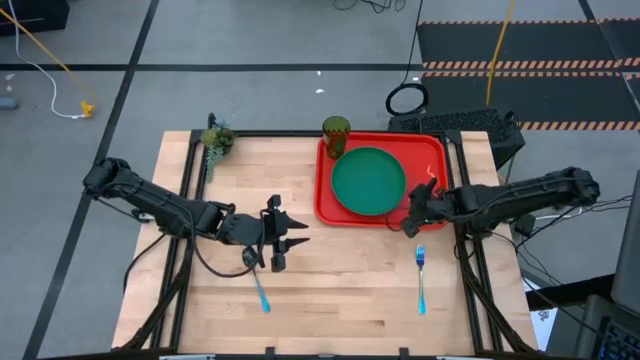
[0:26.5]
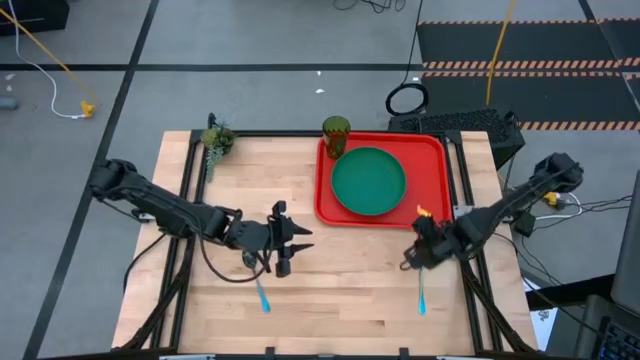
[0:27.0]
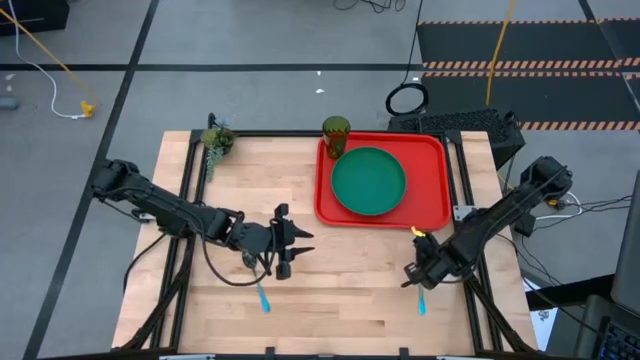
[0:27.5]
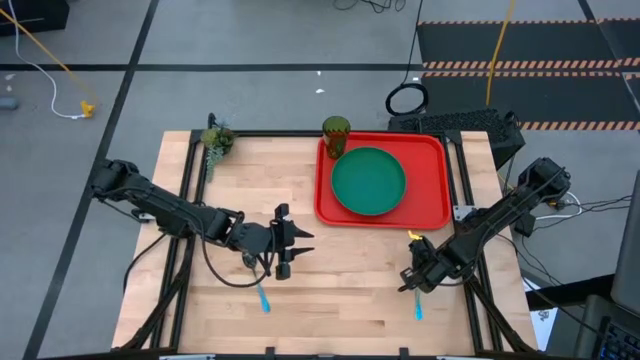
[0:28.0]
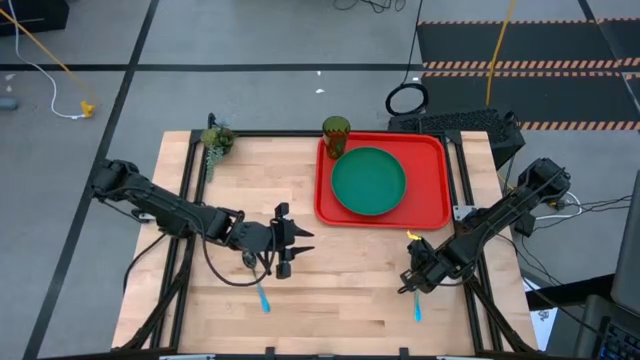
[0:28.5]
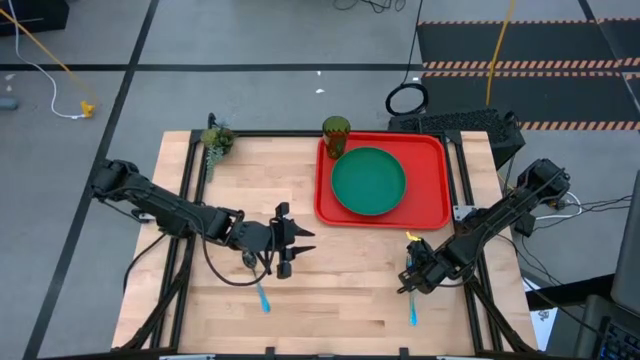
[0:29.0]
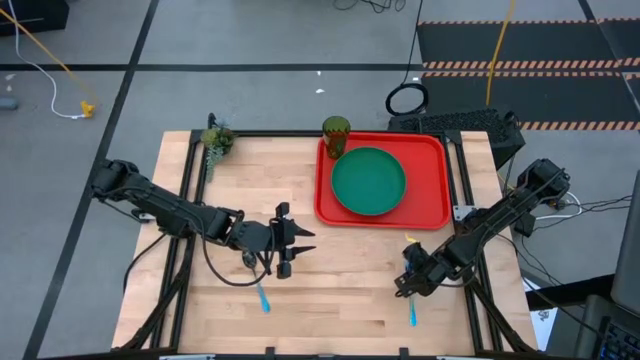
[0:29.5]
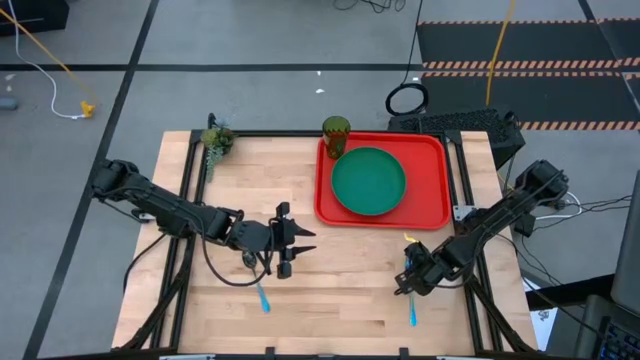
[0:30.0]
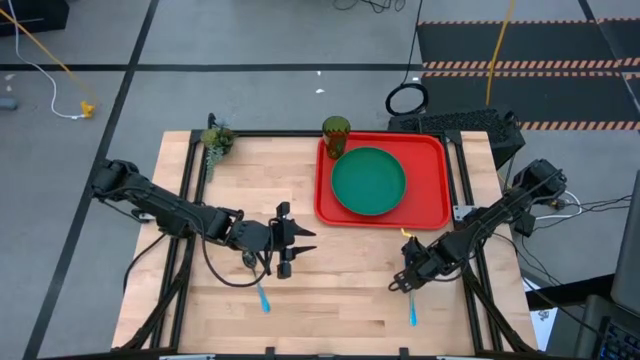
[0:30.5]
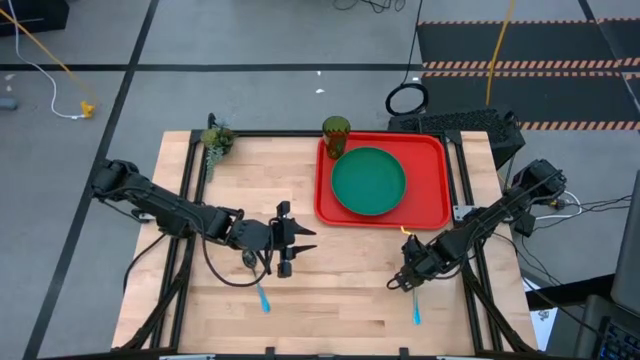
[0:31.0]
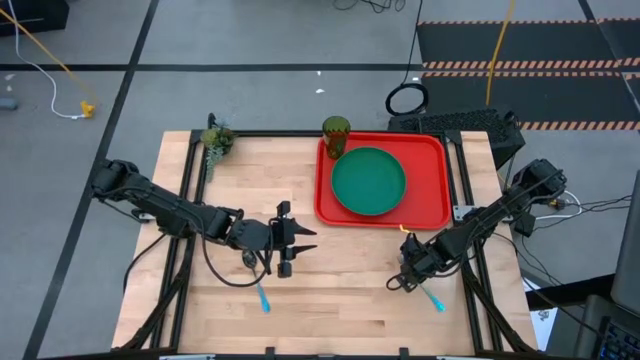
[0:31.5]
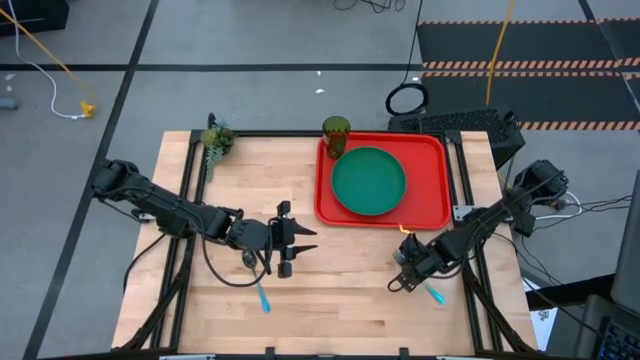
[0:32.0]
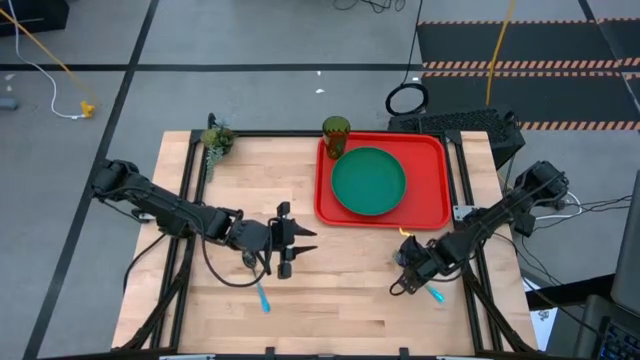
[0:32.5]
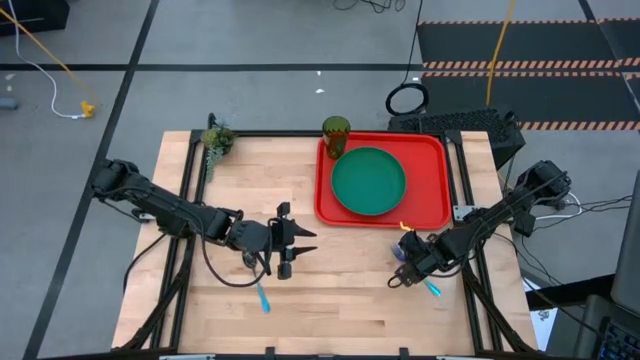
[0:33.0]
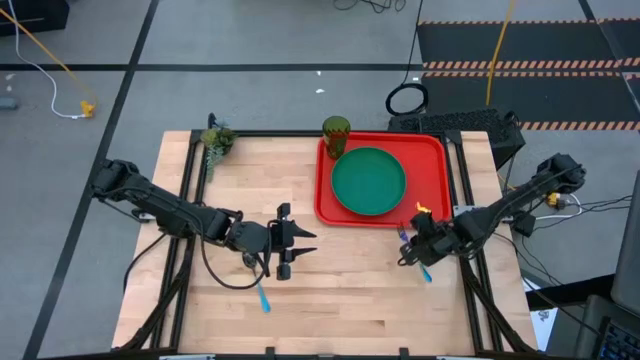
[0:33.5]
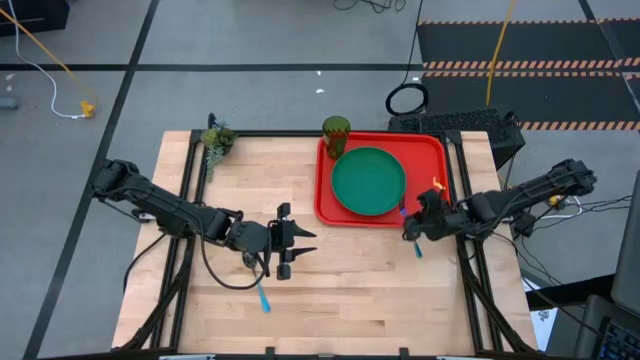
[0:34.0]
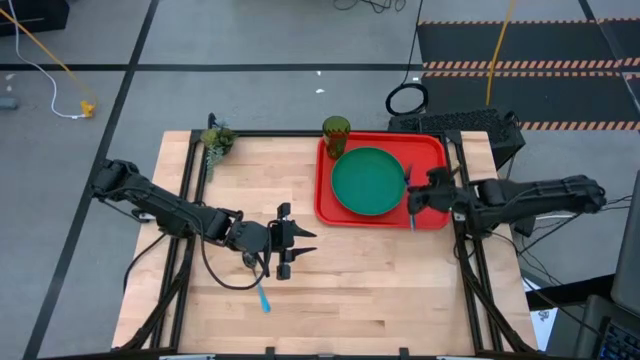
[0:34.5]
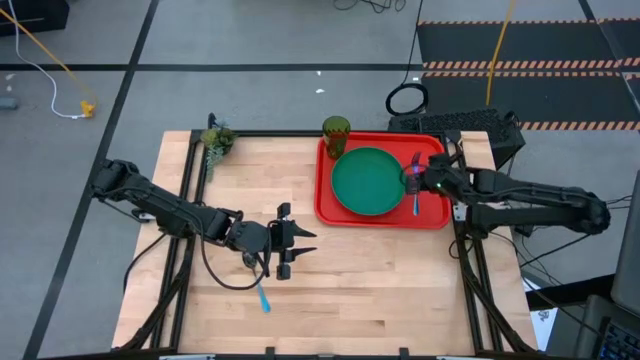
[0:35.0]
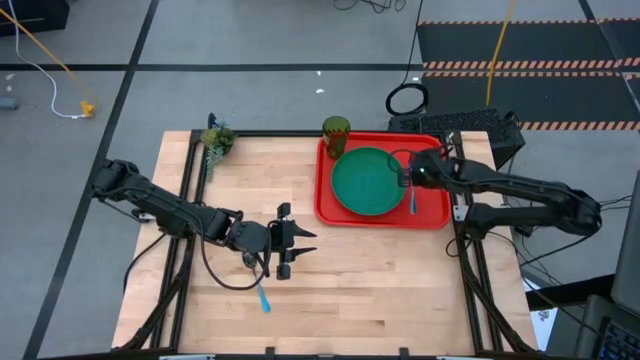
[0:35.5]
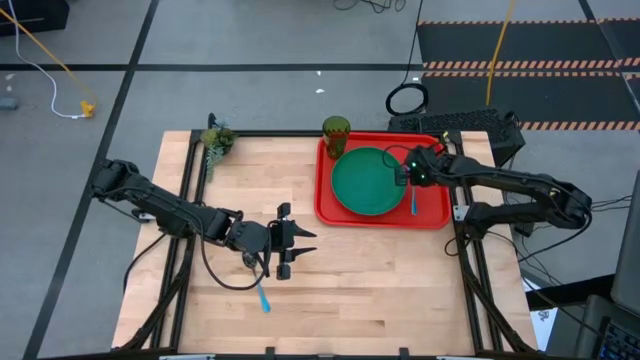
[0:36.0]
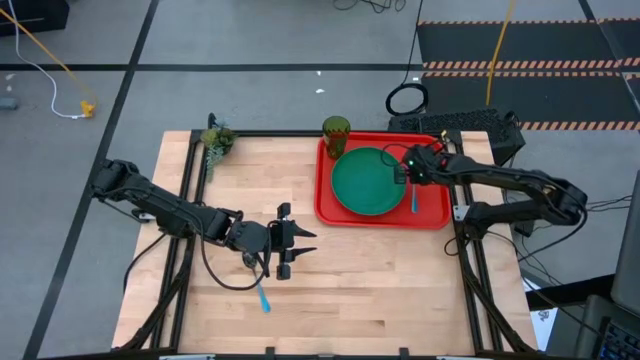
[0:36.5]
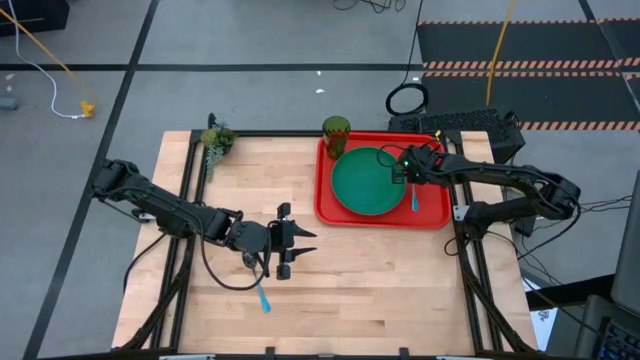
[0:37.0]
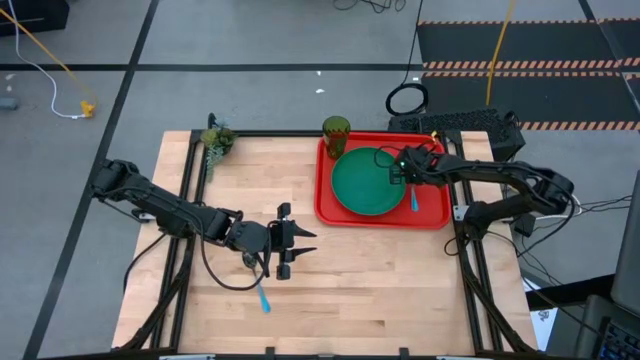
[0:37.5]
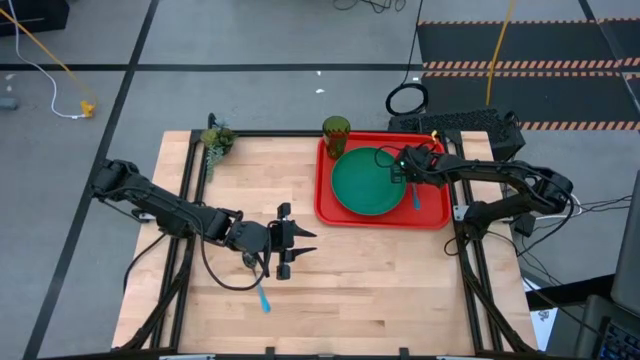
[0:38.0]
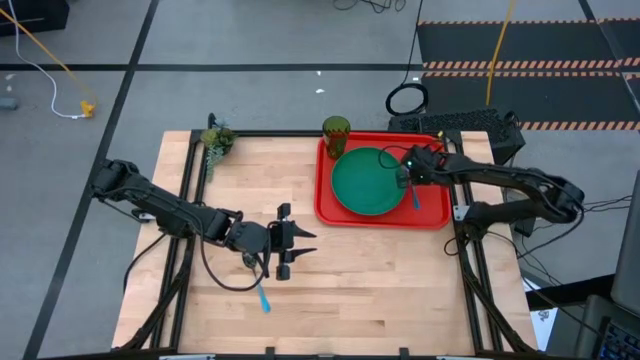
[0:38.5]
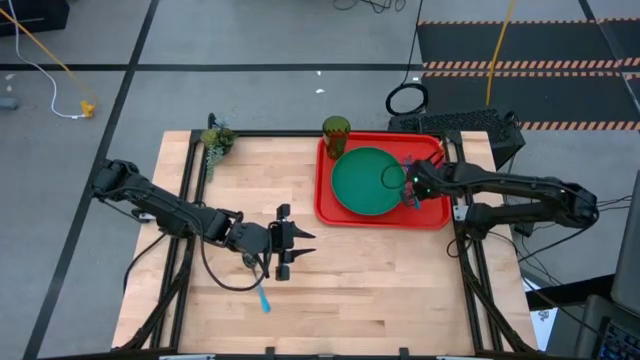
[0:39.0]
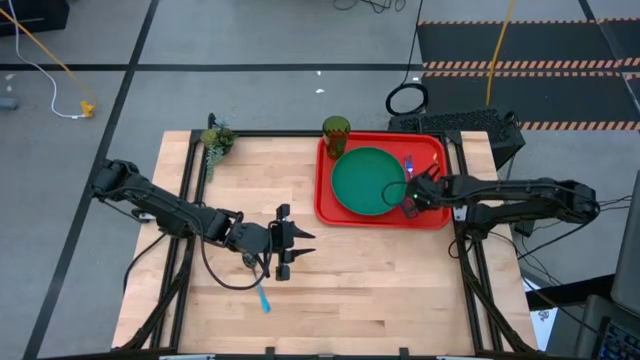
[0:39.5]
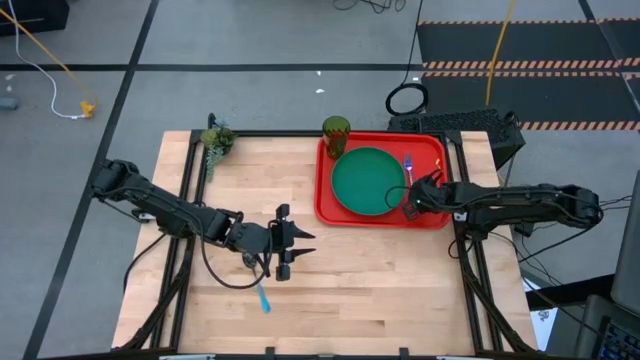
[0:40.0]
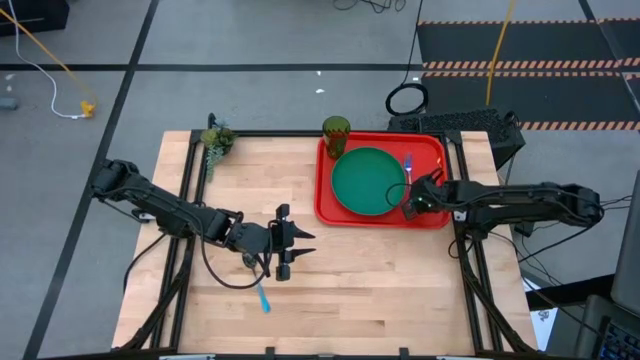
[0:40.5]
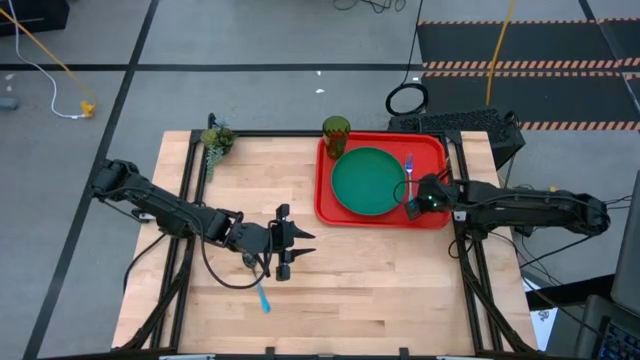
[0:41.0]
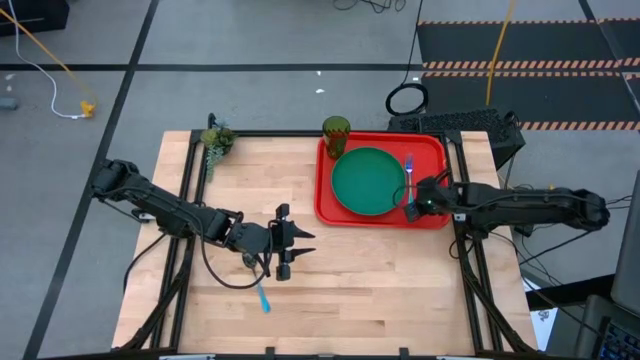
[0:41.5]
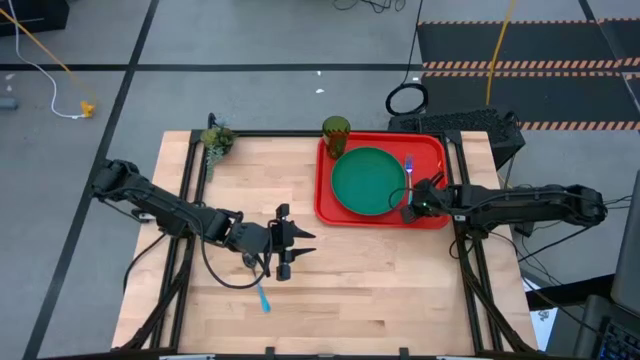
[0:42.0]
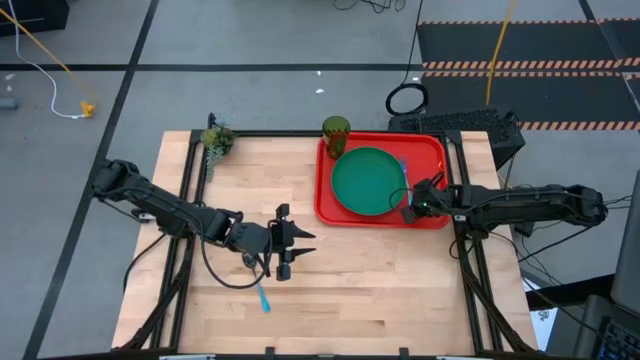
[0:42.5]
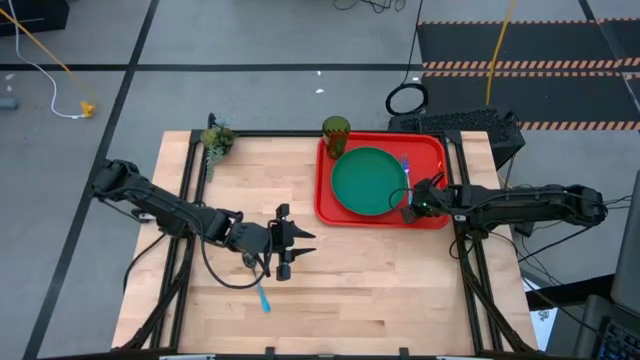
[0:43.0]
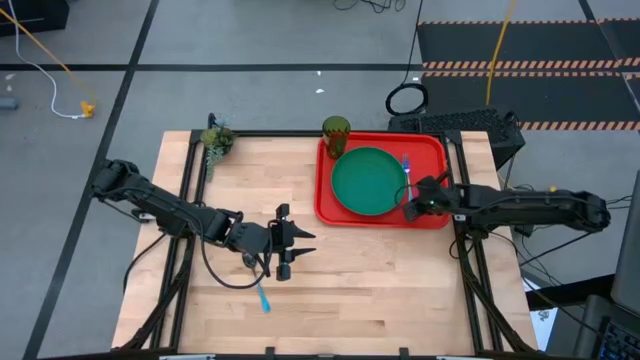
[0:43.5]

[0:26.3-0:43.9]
Task: Pick and place plate/cup/fork/spoon on tray
Put the blue fork on the right side of the plate on the red tray

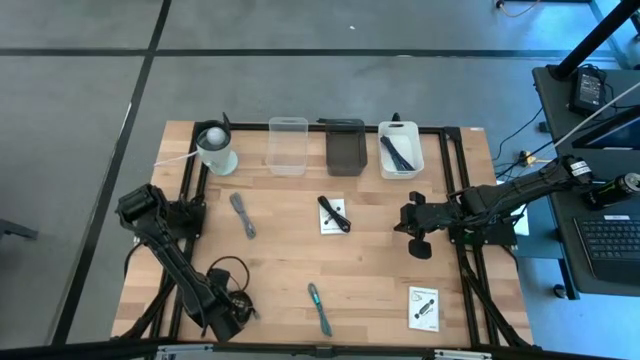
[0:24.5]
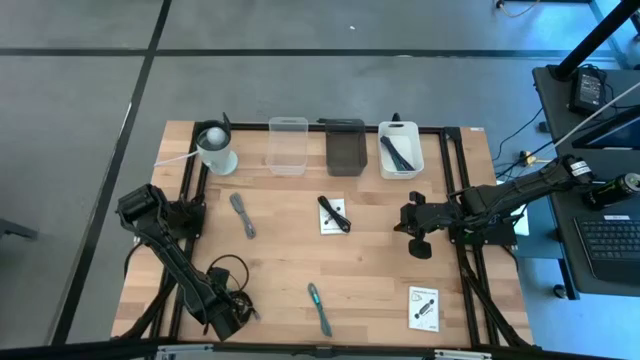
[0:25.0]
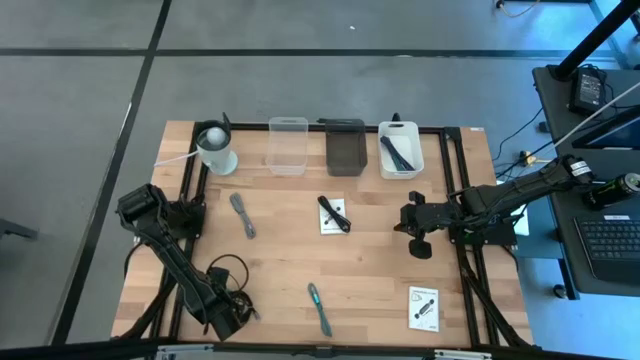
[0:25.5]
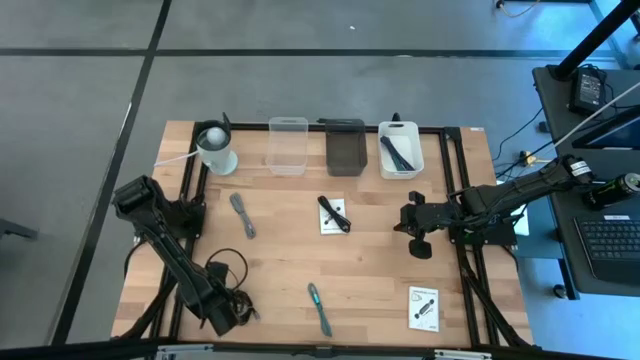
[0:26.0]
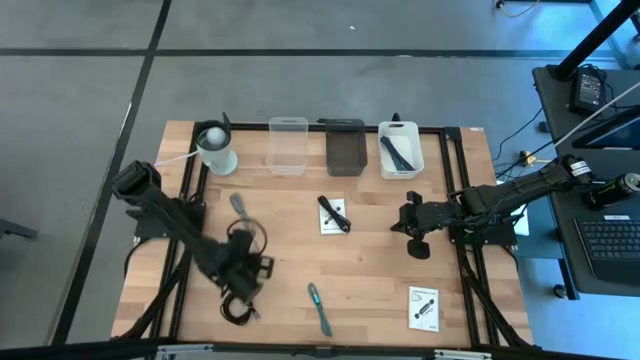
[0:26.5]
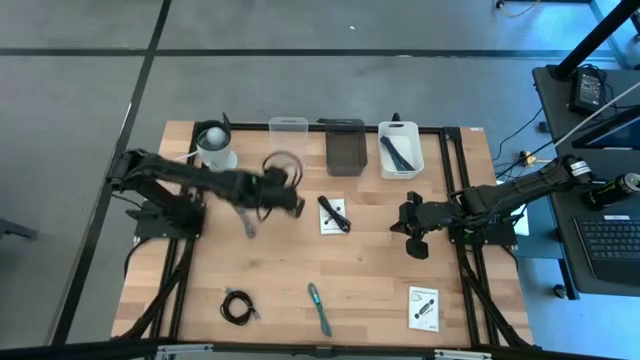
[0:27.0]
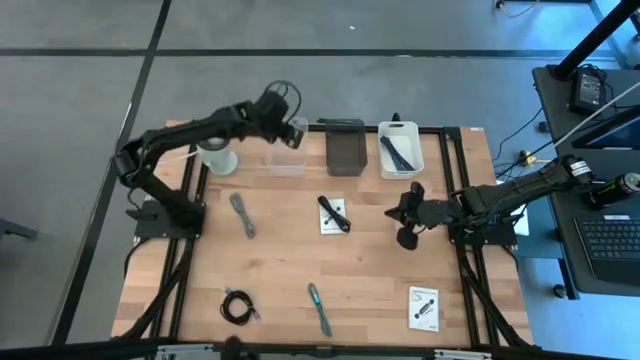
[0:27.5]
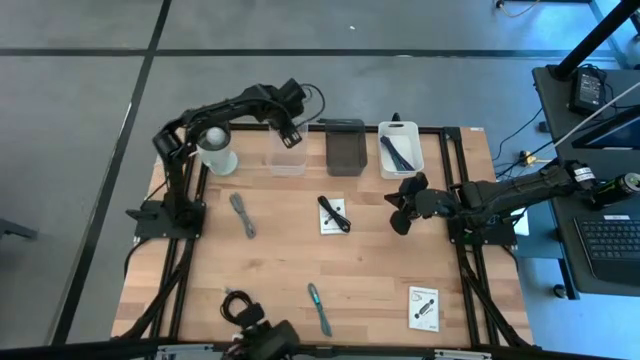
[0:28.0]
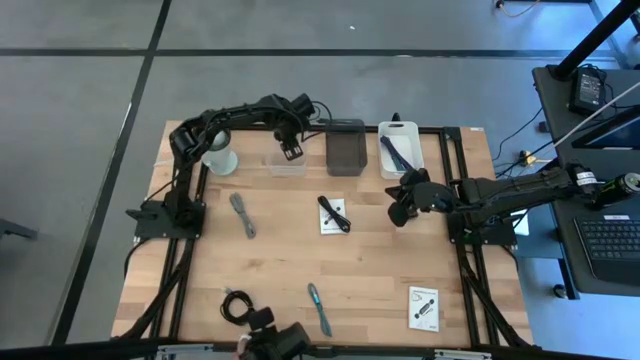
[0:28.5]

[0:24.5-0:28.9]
Task: Pick and place items into bin
Put the white charger adapter into the transparent bin
